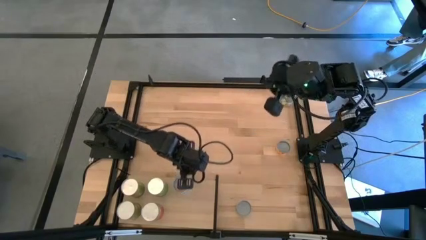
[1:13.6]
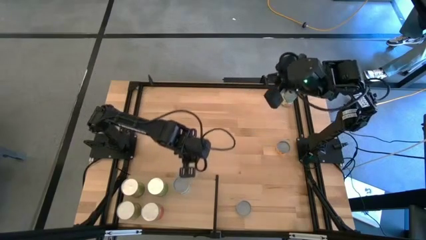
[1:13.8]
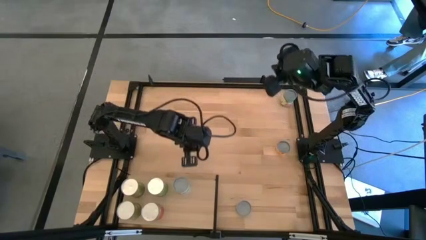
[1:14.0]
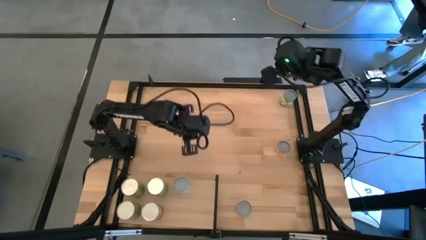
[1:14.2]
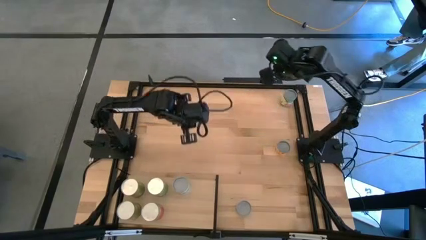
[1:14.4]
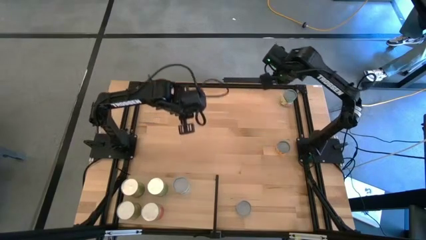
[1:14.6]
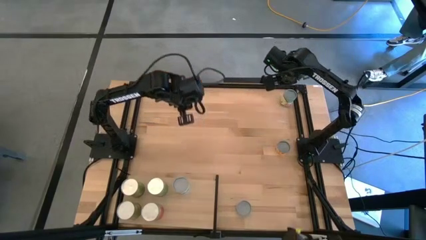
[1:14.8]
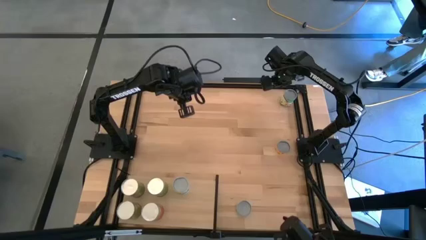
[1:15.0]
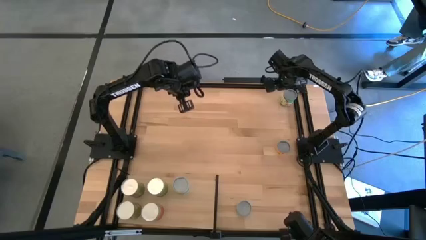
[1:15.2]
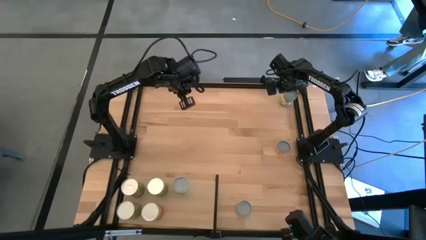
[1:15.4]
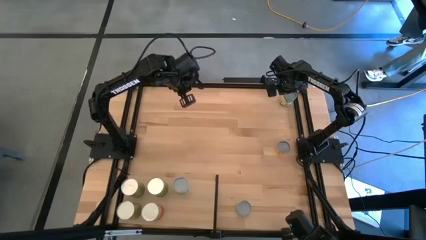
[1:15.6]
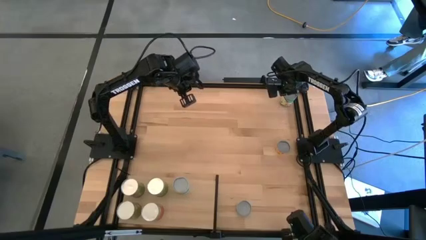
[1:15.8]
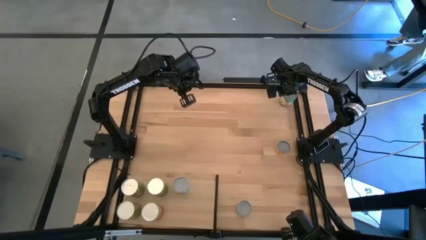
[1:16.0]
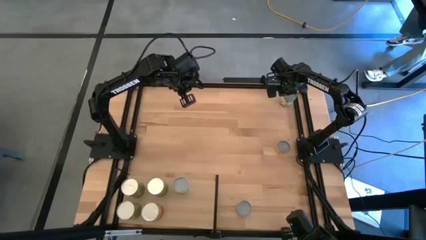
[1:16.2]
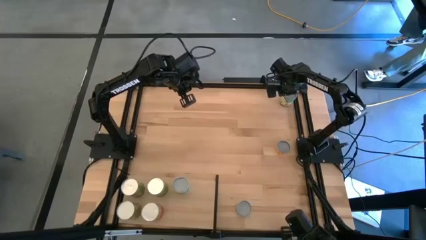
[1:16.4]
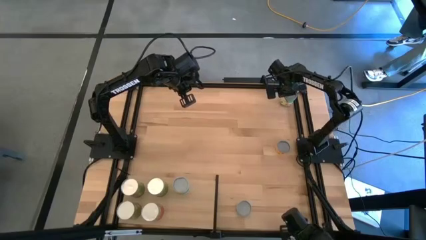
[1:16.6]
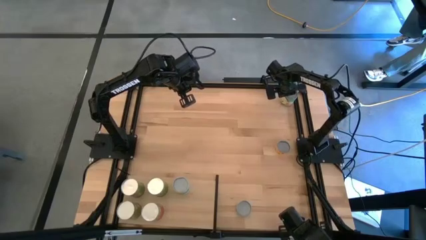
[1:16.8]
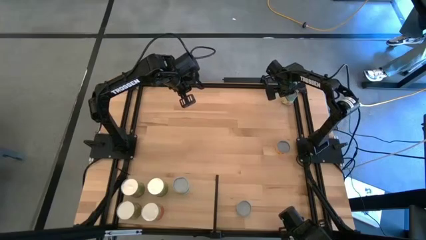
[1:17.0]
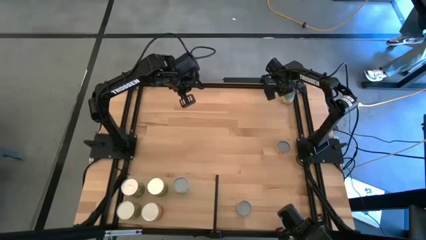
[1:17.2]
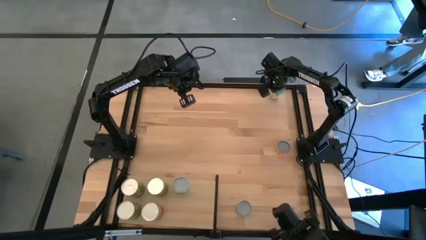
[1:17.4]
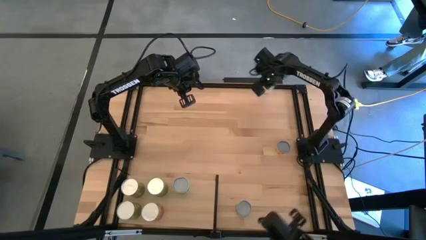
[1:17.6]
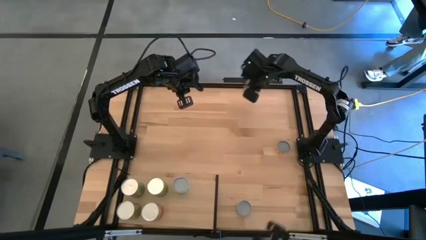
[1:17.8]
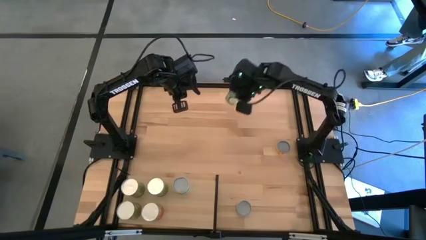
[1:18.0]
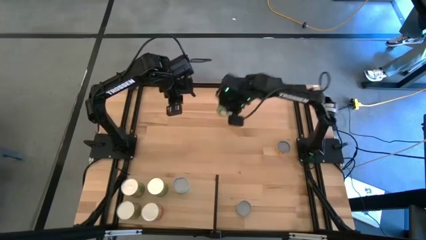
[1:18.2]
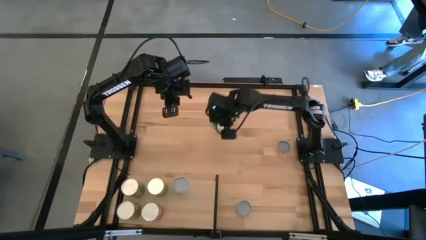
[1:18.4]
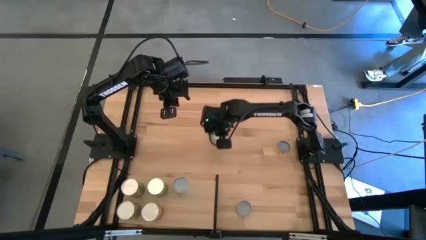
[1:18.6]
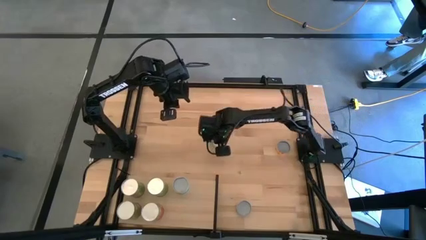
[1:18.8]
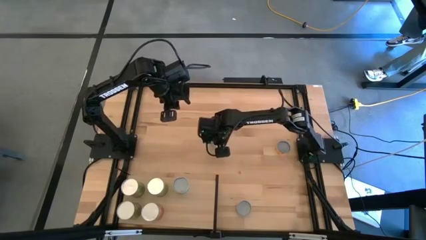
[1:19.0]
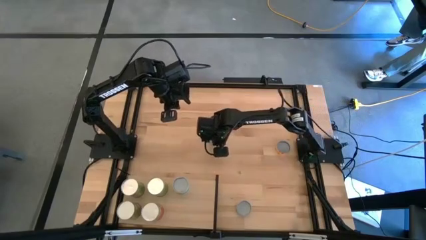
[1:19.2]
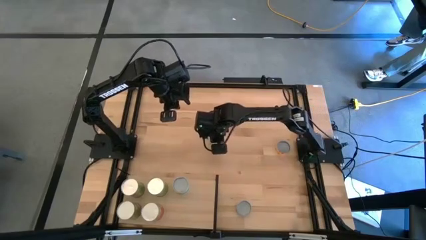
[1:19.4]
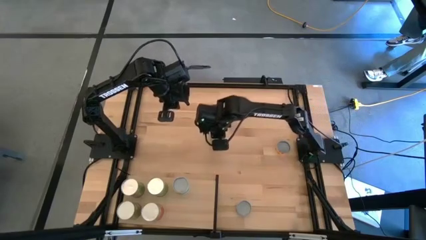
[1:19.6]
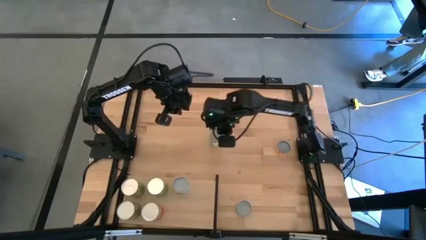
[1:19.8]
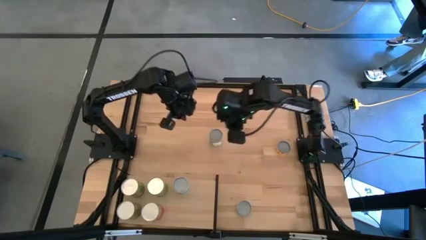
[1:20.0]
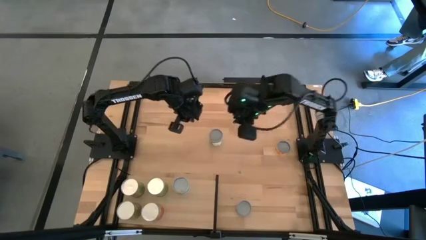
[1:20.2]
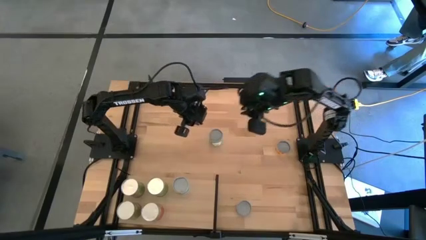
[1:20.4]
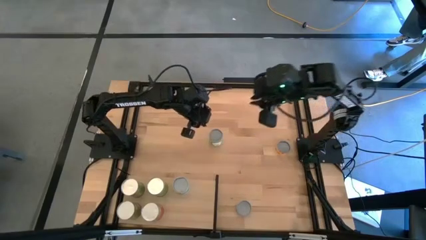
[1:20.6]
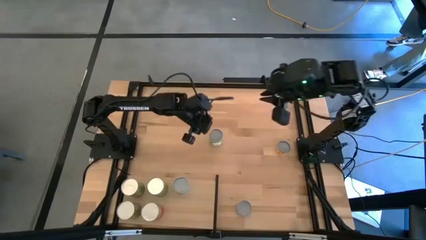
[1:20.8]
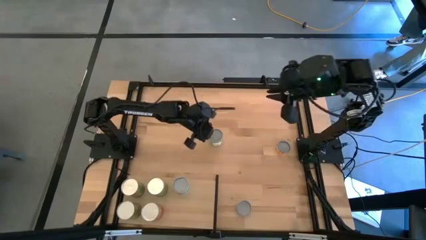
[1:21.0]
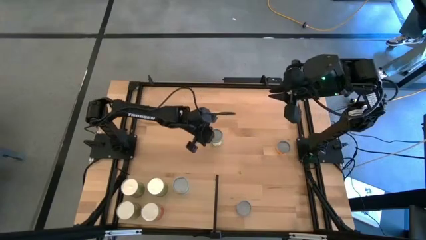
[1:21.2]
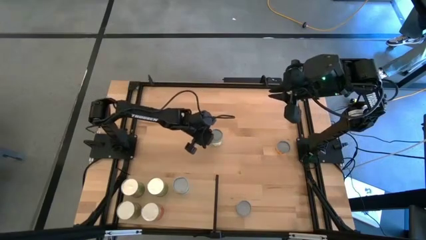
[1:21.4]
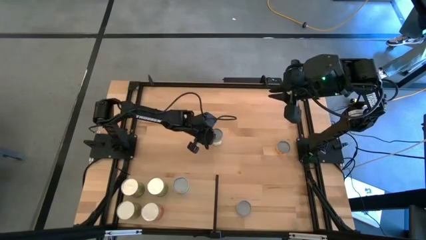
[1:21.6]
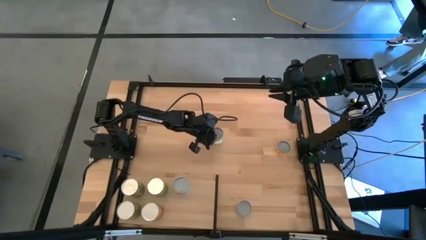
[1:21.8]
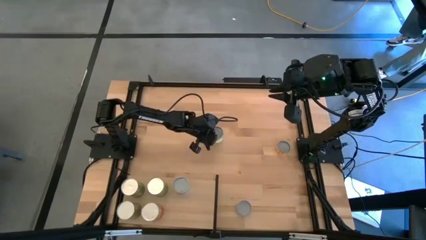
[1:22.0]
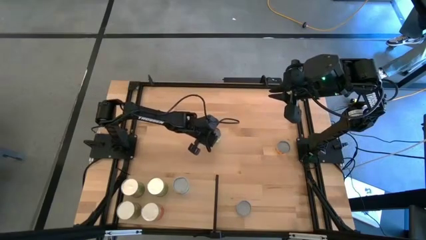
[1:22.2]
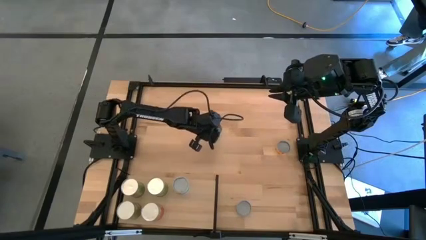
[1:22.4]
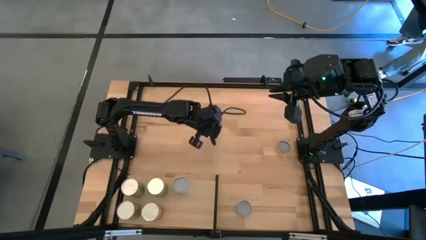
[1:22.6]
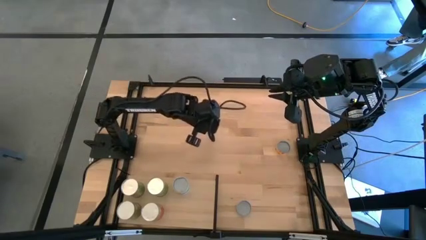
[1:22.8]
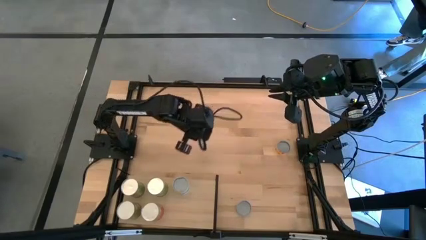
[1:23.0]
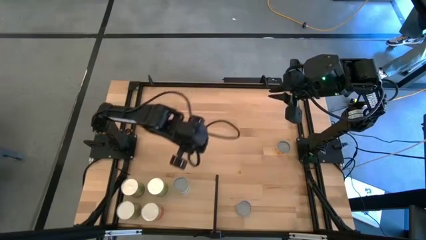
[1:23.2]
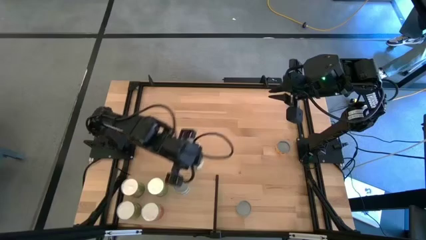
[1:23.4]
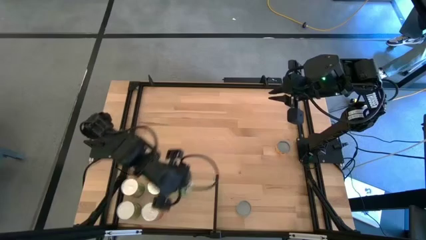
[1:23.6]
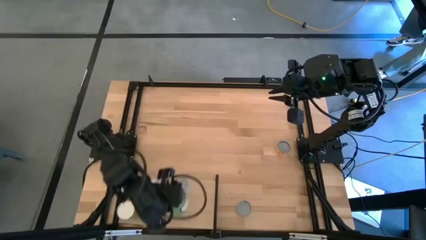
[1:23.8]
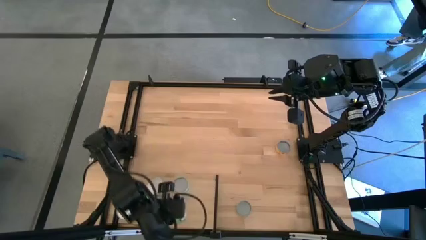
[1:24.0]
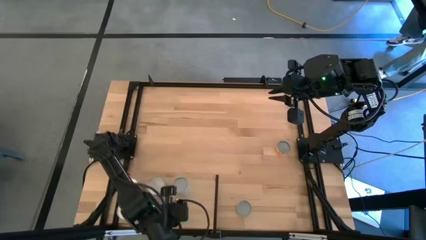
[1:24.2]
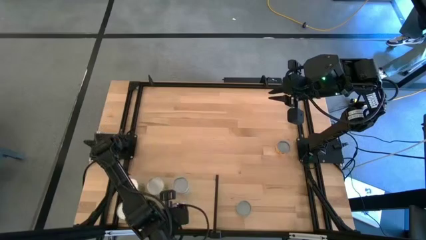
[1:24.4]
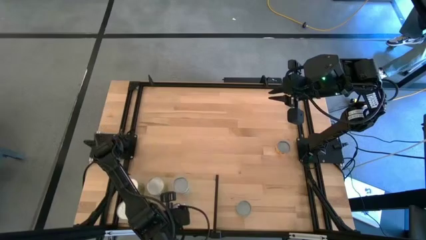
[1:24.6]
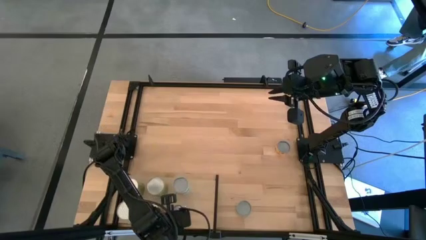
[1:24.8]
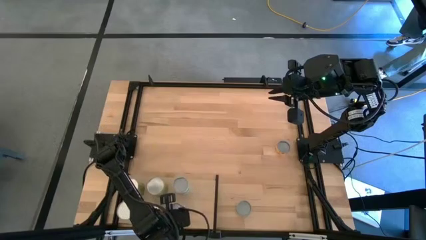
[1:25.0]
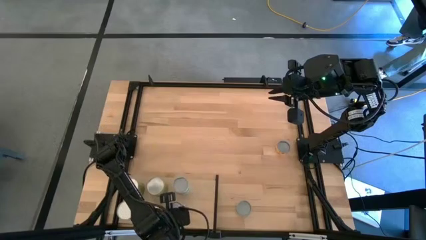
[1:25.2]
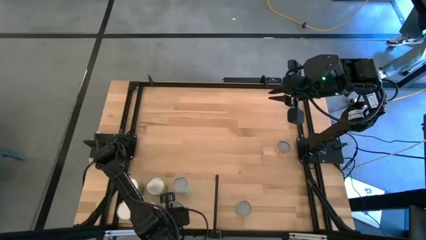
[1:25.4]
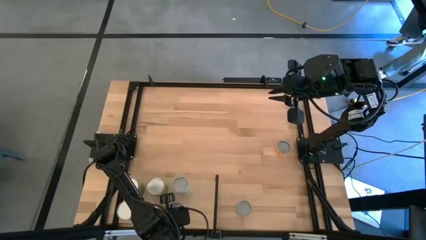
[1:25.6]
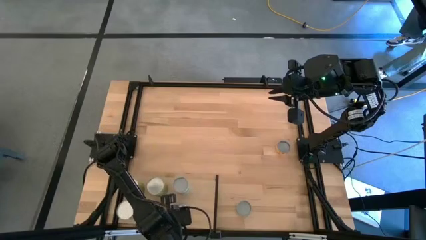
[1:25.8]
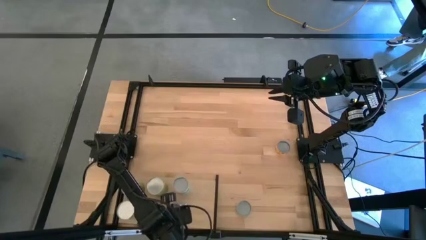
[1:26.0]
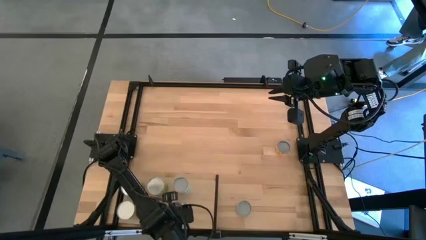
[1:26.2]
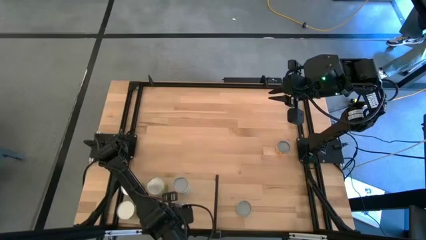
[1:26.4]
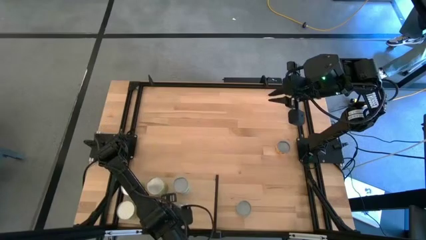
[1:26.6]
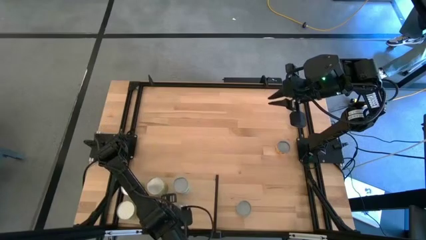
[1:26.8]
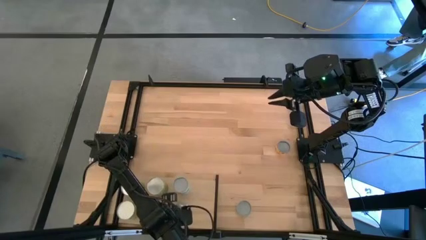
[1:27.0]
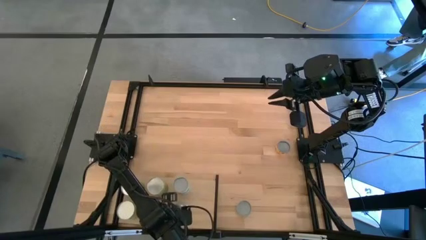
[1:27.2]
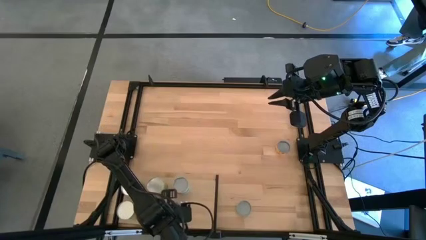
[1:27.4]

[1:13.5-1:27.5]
Task: Pick and place cans onto a shelf
Put the canned chicken soup on the shelf

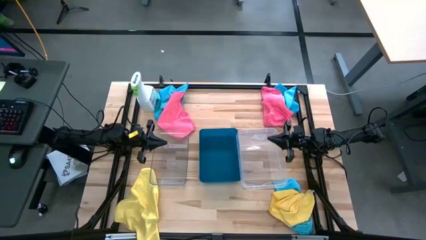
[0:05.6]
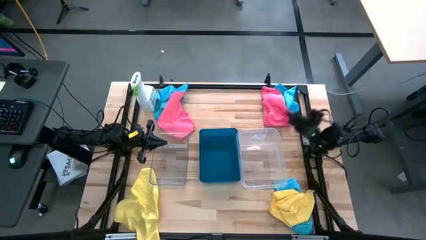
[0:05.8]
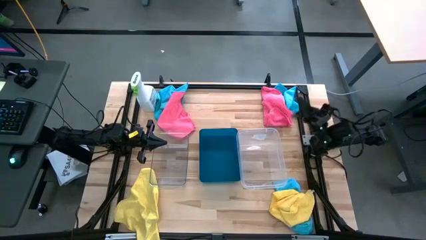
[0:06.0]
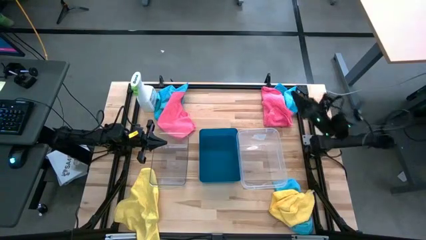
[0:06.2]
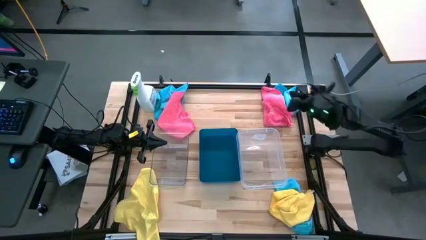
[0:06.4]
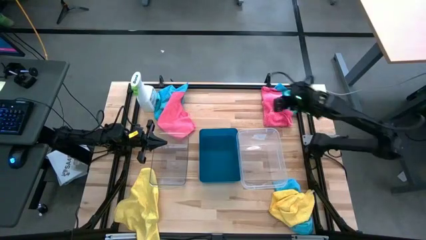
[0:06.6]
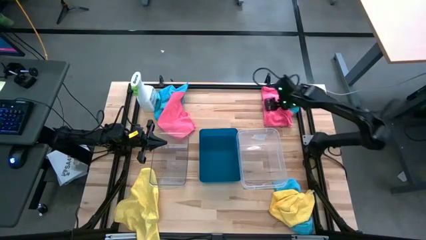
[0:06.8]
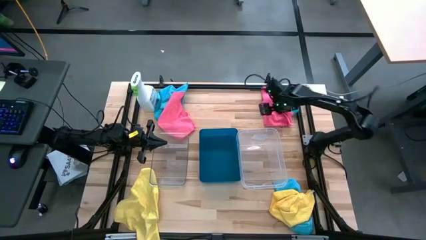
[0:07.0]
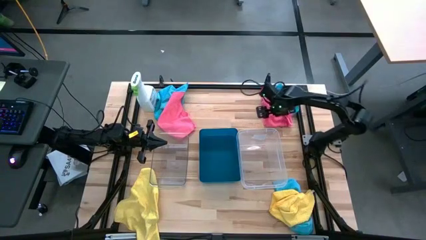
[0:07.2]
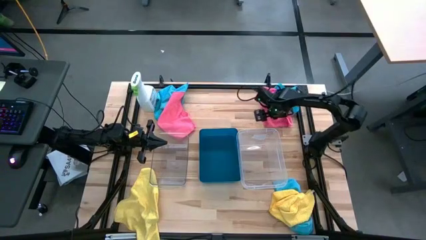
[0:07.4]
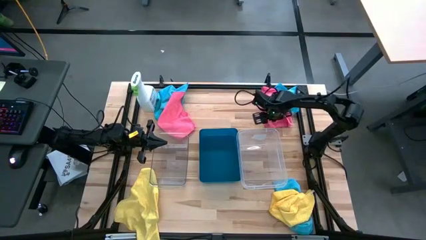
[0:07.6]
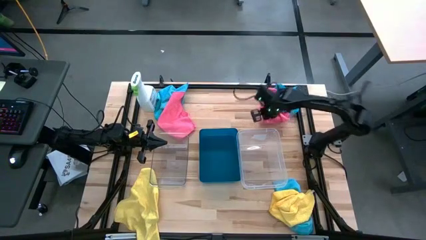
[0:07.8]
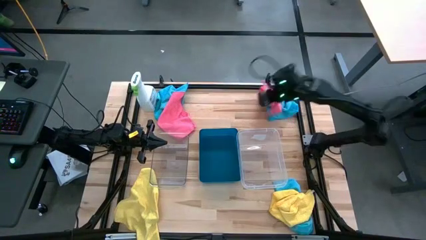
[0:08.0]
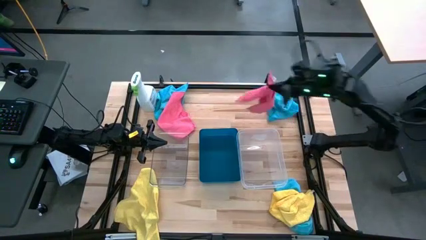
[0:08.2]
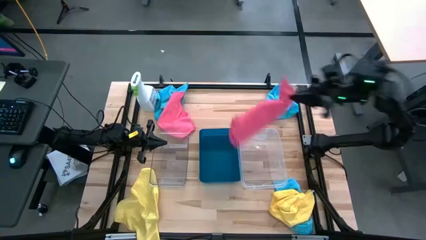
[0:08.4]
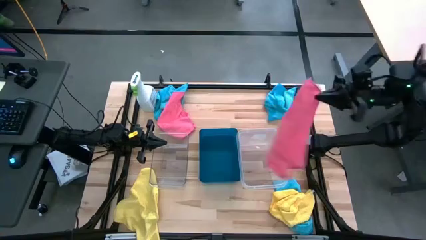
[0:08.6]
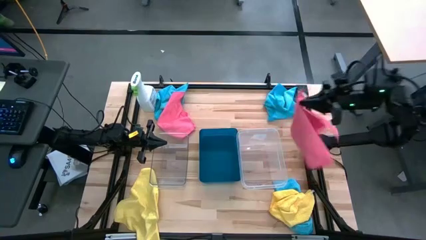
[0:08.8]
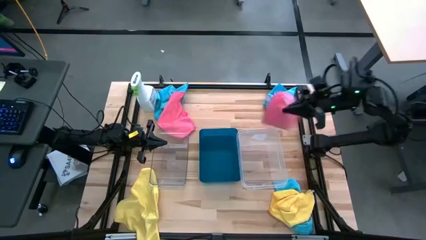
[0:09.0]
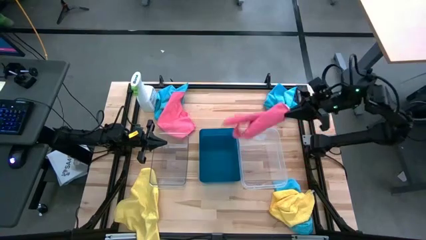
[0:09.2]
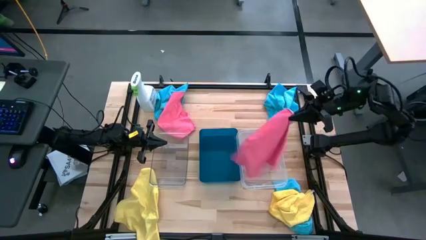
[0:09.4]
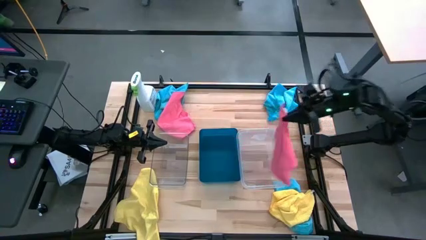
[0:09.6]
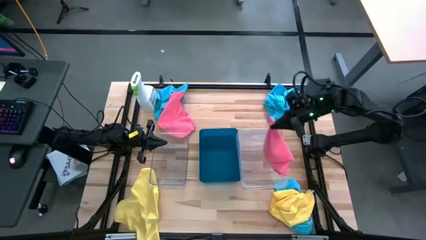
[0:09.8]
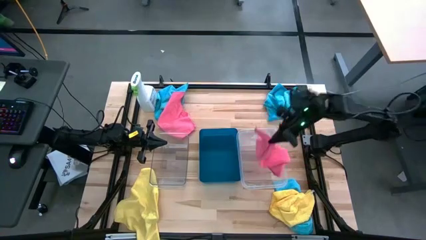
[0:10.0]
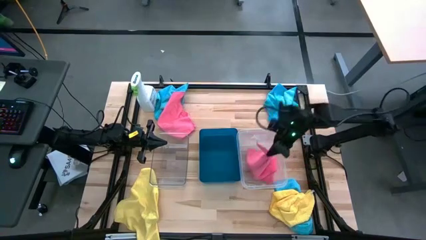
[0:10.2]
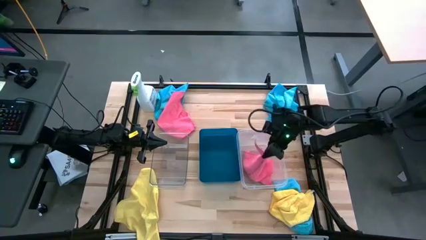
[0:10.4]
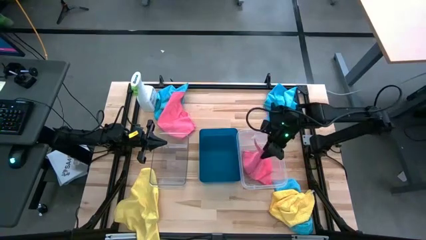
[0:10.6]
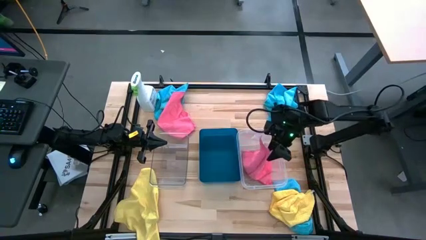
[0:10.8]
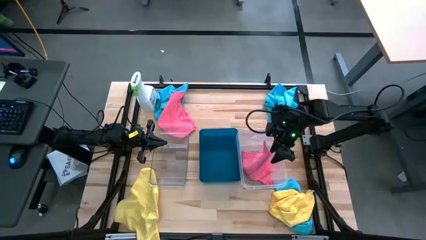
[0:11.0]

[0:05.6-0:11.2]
Task: Sort microfiber towel by color & place in baskets
Put the right pink microfiber cloth into the right transparent bin
